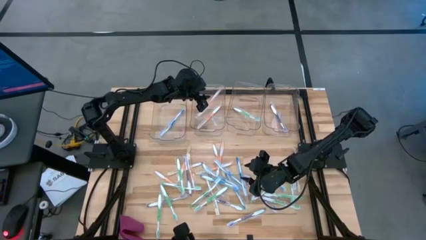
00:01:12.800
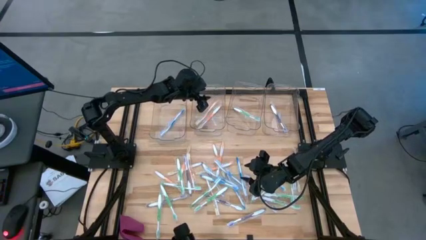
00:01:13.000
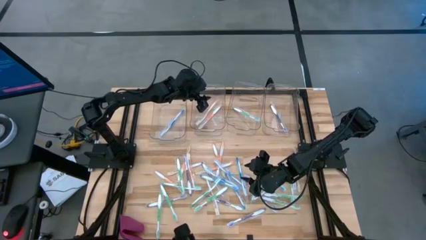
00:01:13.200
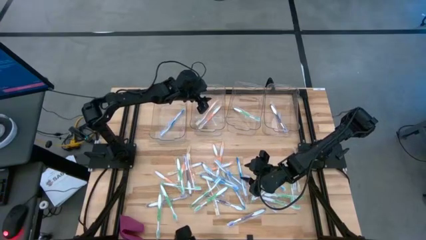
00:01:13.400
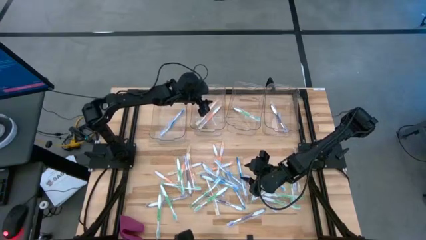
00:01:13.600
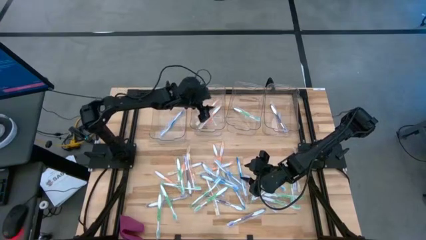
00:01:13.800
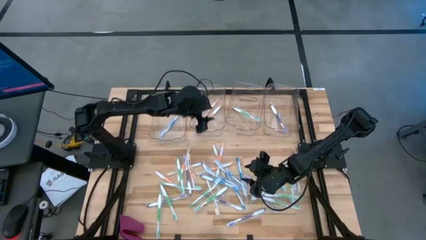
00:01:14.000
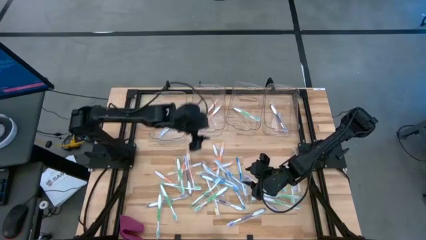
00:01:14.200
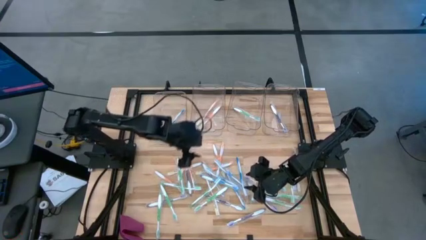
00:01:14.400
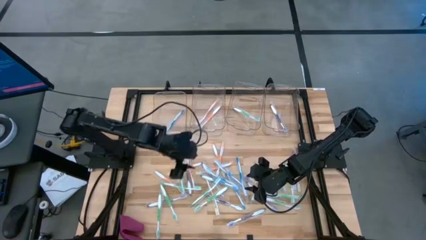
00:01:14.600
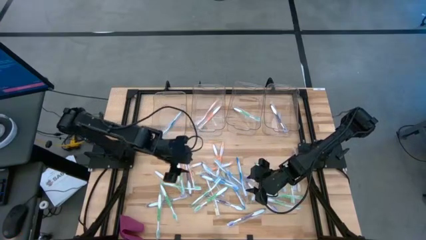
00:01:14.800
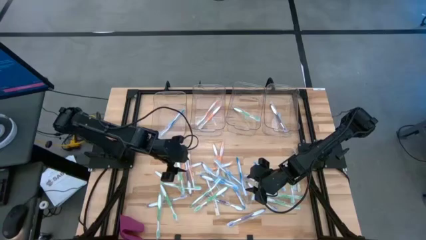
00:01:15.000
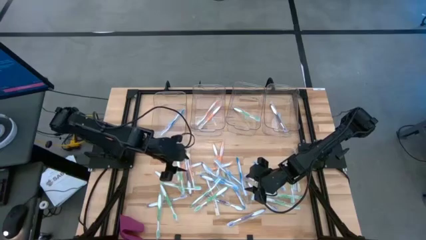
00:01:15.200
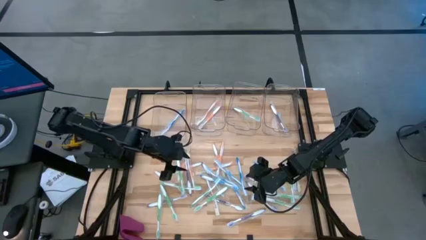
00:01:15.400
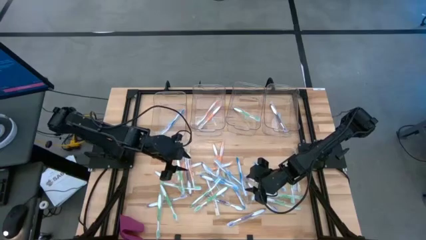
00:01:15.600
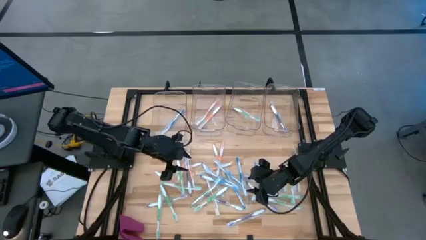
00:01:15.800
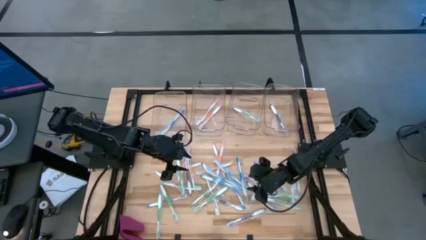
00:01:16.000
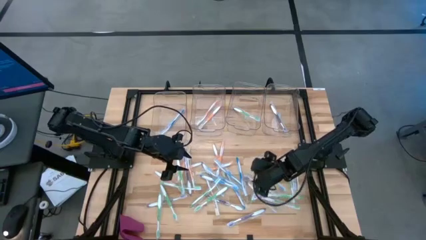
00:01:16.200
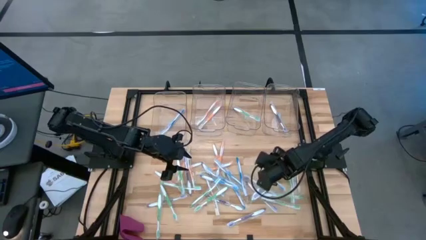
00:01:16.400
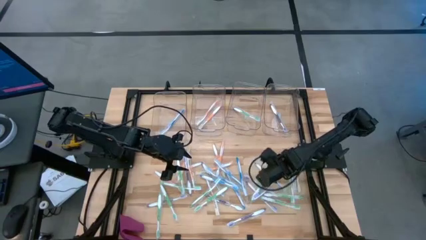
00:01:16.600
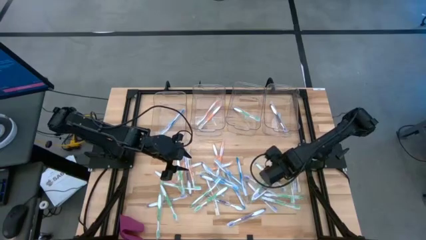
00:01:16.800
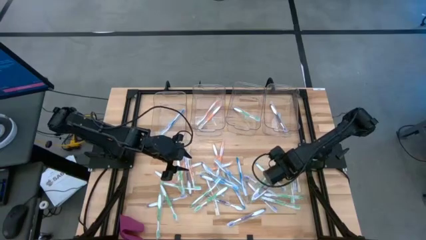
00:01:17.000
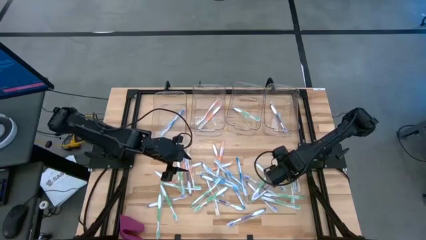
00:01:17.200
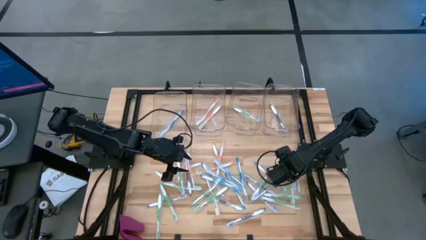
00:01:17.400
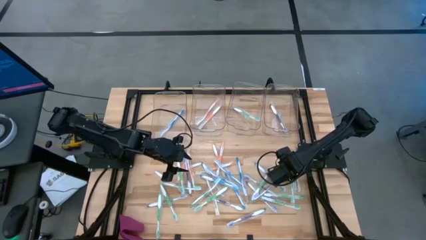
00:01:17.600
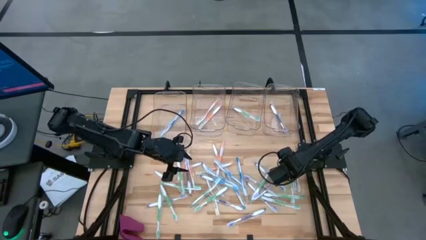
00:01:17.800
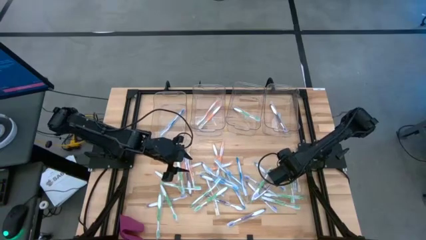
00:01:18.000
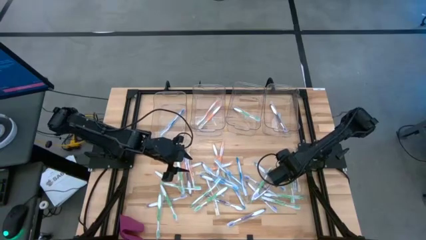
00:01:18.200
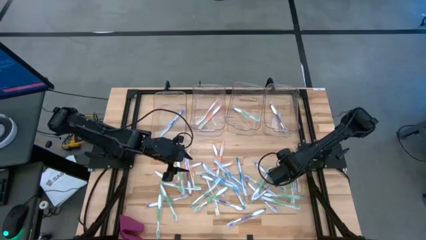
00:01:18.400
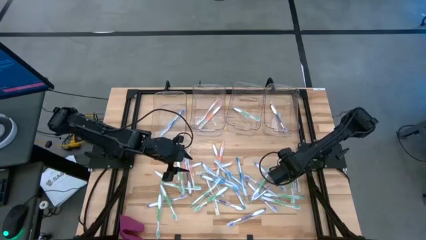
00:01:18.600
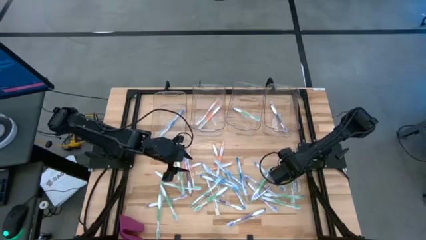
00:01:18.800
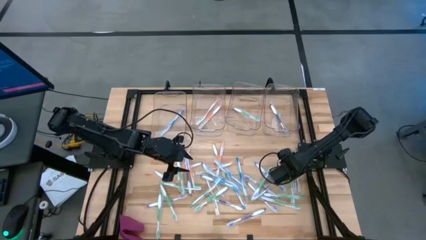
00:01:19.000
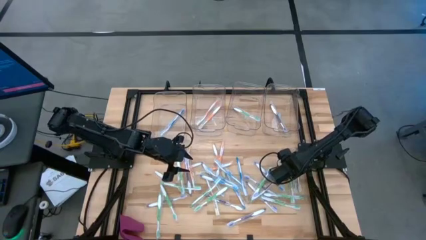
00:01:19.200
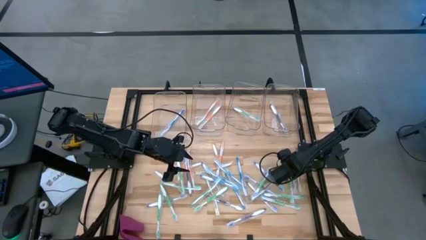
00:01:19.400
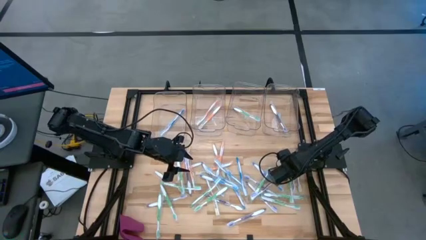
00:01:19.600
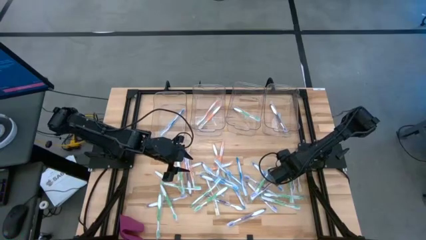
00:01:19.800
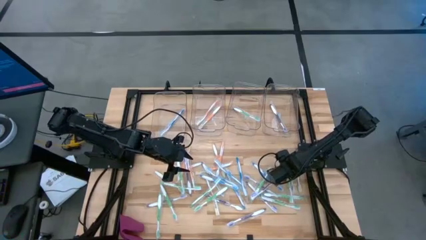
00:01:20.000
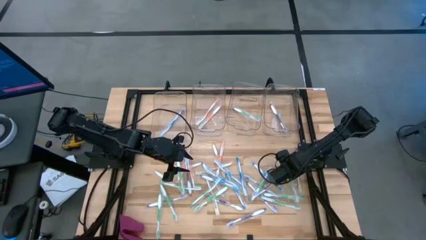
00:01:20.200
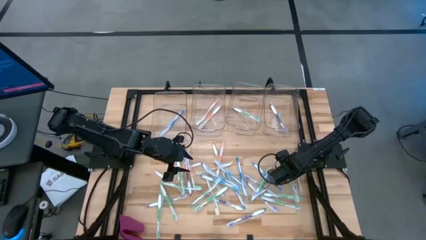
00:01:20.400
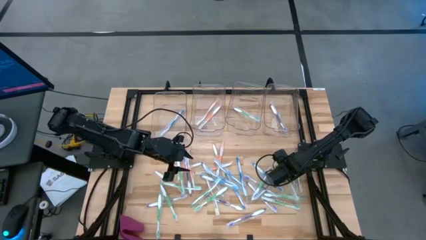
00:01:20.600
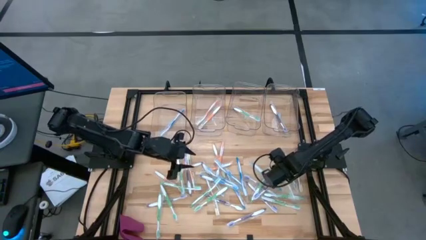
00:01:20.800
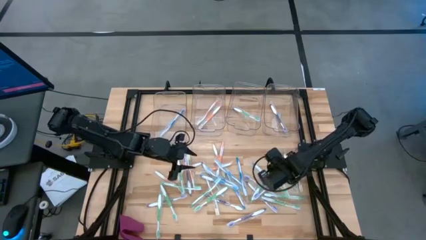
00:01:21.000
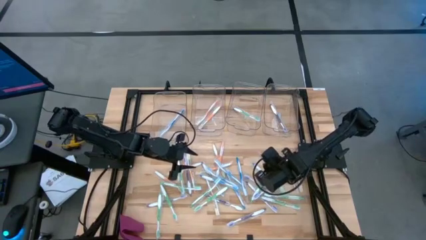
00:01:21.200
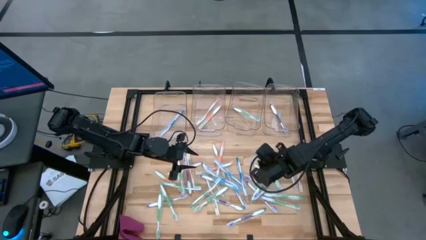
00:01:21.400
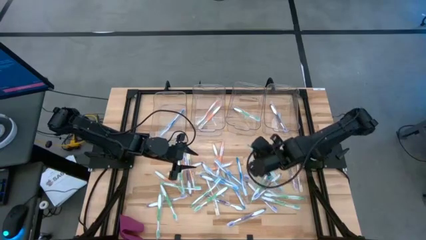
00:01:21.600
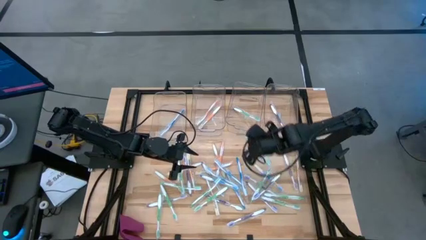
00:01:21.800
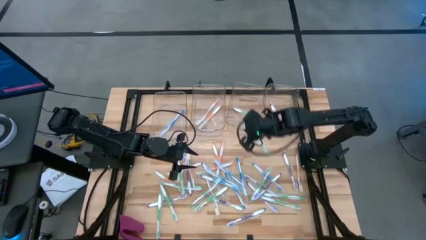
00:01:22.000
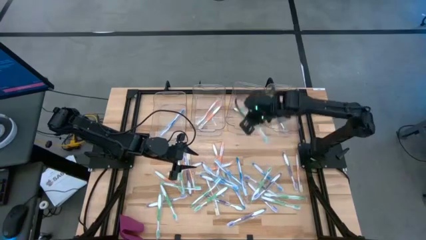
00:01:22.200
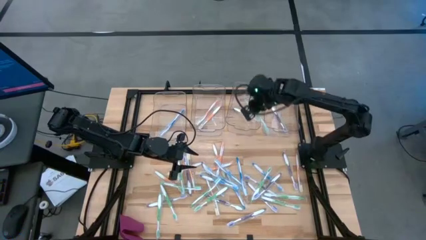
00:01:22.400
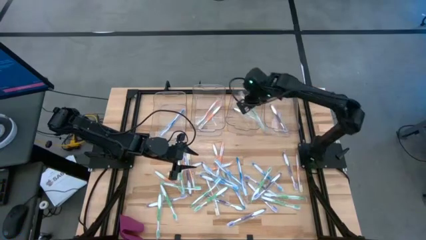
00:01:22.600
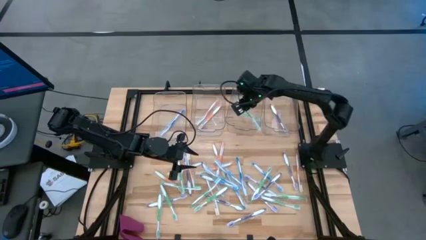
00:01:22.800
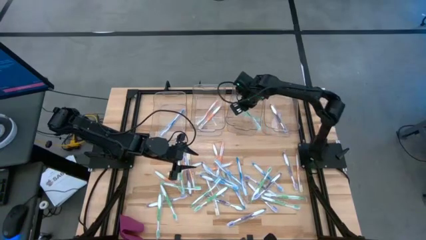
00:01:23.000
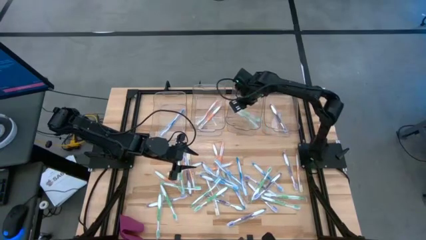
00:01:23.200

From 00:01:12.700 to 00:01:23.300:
Task: Pick & Place Toothbrushes
Put the green toothbrush into the middle right transparent bin

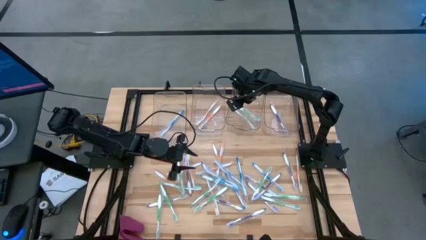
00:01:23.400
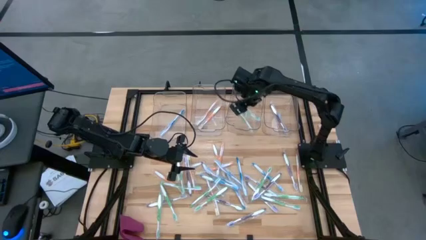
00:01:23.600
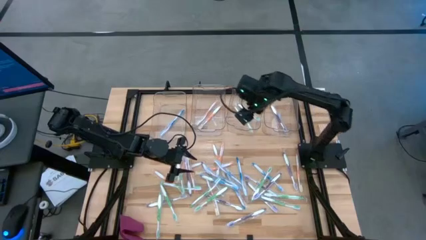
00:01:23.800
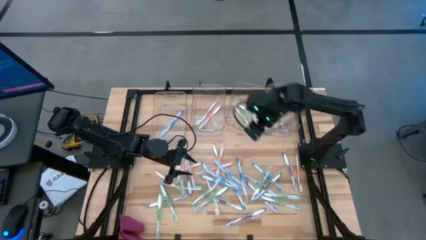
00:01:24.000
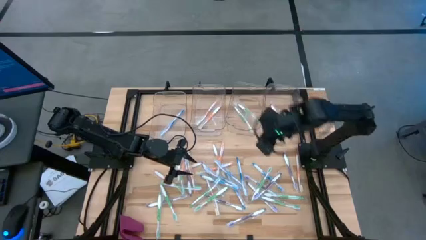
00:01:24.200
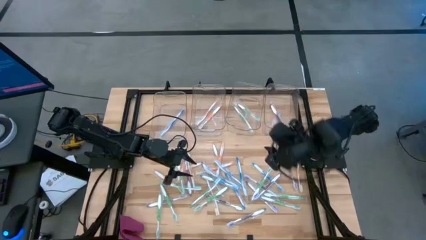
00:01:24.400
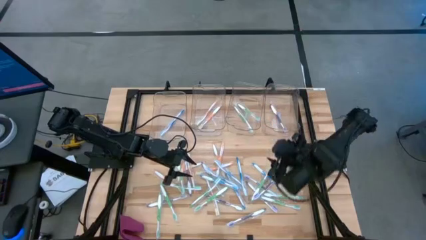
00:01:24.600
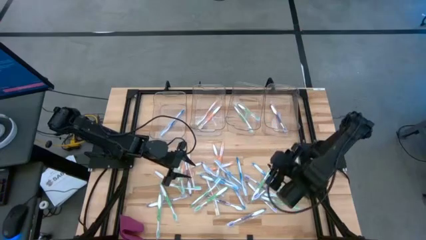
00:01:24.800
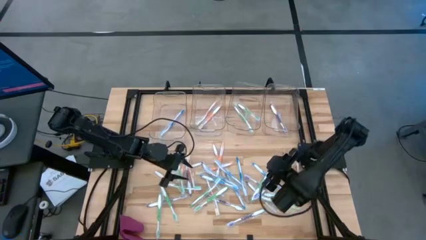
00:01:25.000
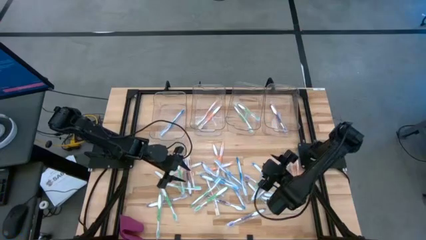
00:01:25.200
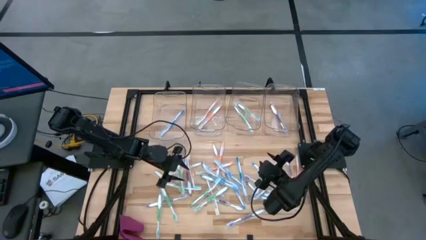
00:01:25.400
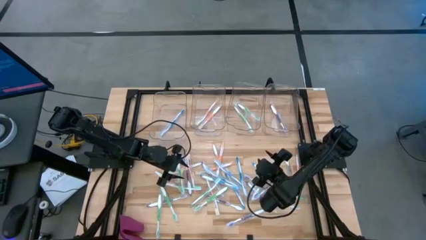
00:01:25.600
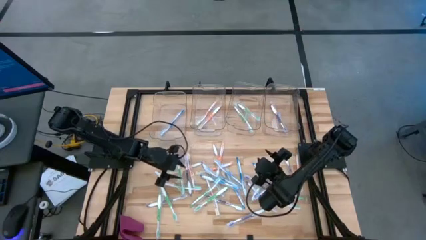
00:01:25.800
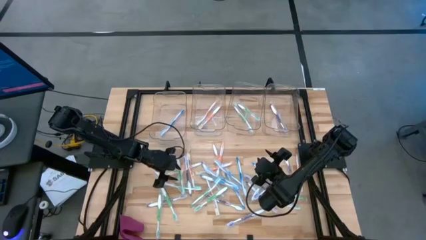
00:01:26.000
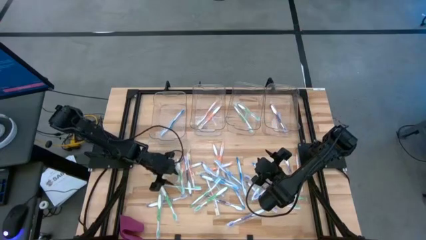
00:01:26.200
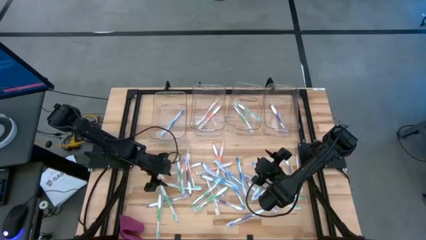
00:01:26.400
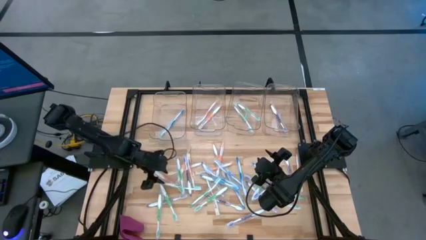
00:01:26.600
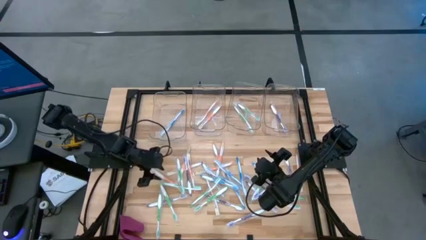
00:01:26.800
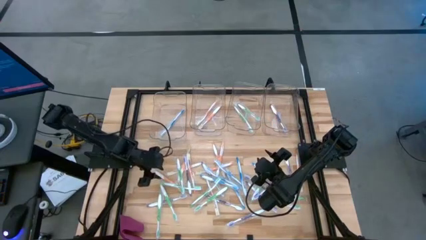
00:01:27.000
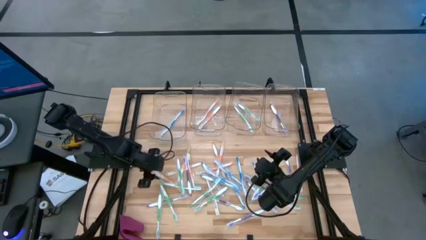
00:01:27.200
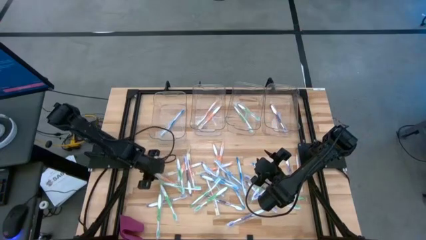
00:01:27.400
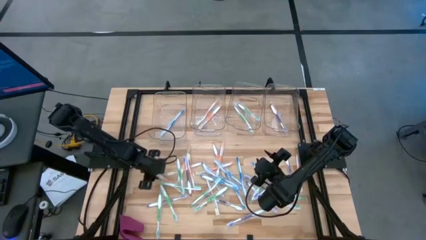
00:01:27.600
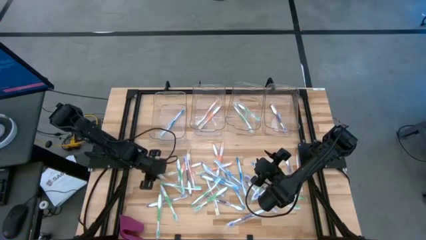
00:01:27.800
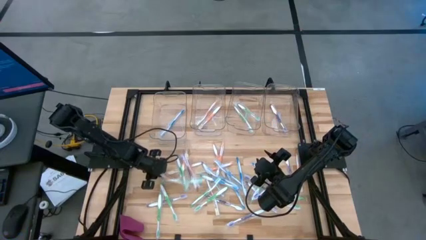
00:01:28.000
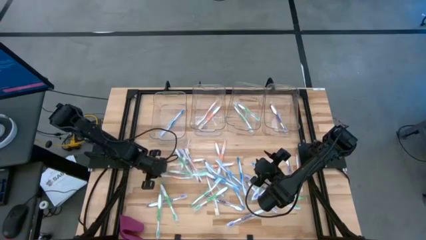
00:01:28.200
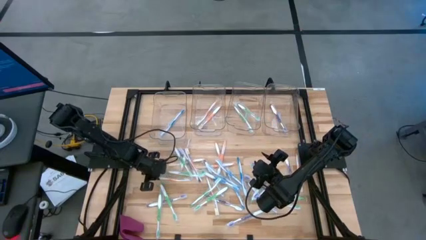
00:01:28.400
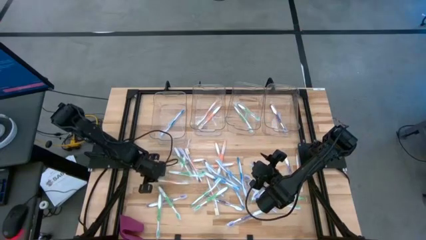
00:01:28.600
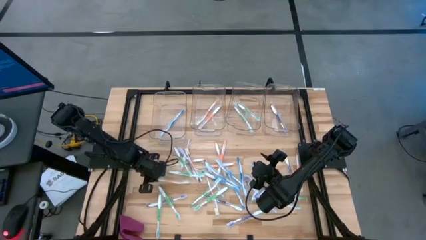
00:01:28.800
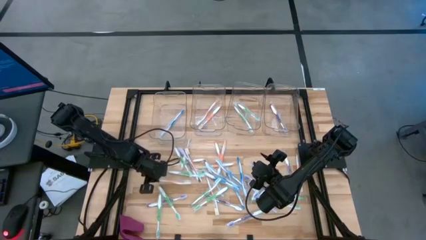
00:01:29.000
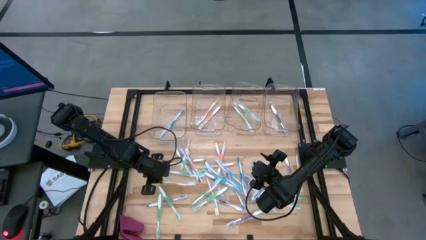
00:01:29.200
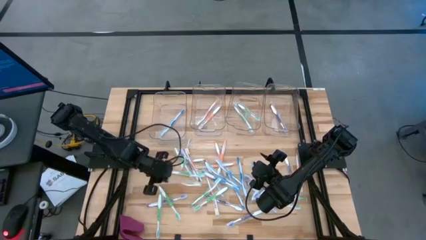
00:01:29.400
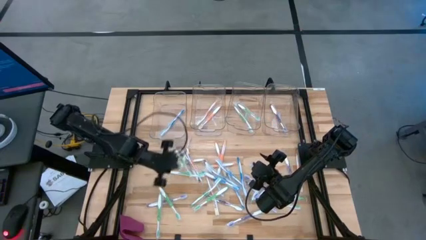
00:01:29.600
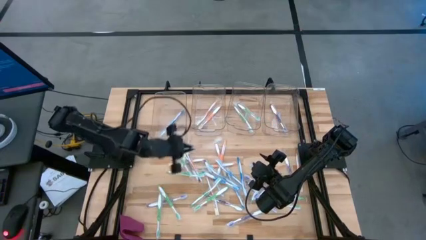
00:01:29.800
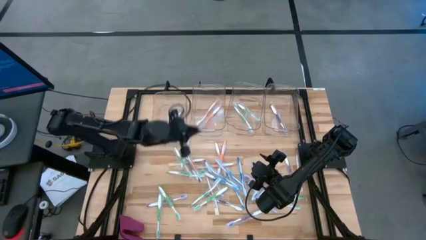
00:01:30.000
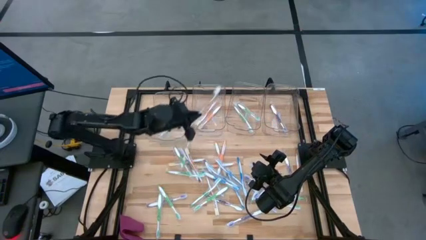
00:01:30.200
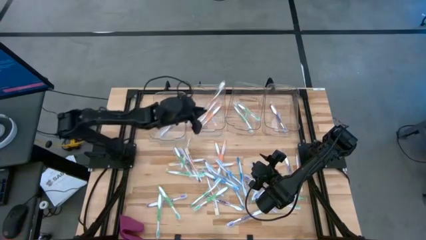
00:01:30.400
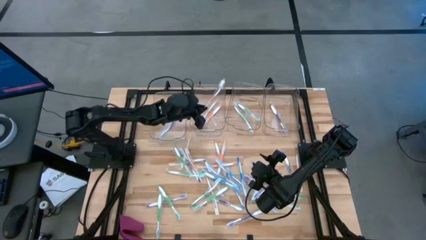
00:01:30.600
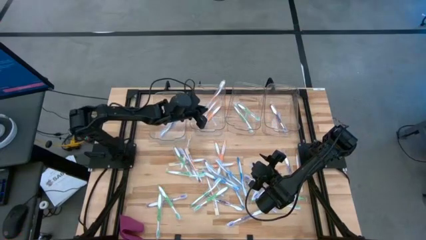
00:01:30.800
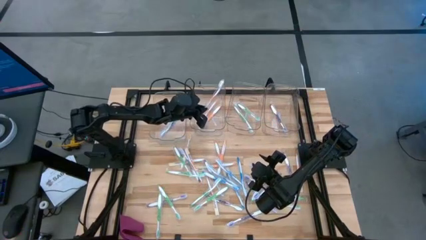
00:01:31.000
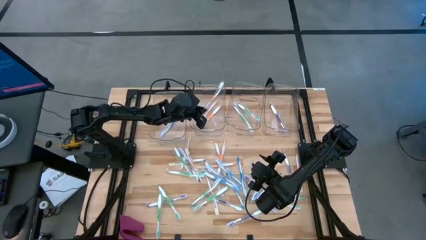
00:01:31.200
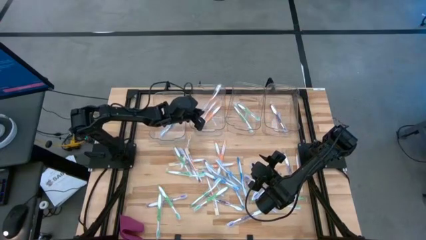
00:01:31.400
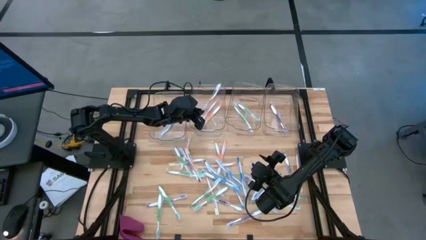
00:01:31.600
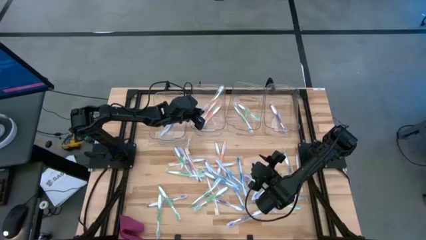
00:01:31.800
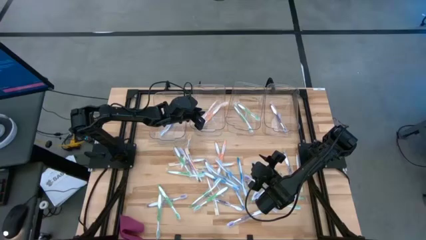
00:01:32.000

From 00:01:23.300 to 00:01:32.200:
Put the orange toothbrush into the middle left transparent bin
